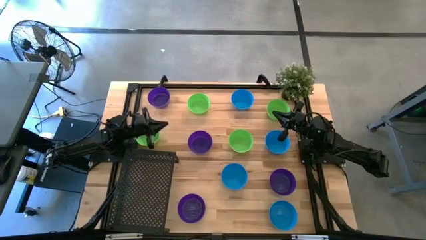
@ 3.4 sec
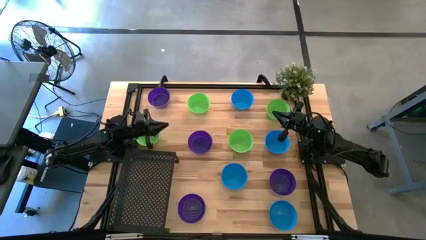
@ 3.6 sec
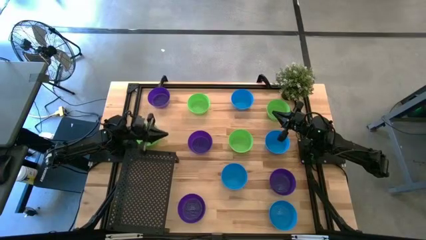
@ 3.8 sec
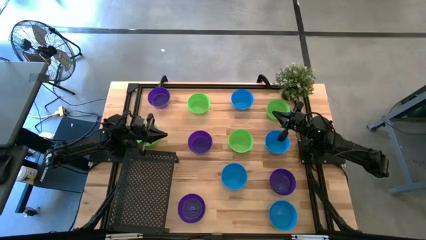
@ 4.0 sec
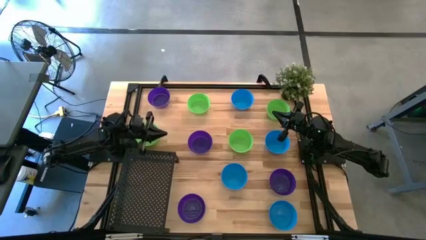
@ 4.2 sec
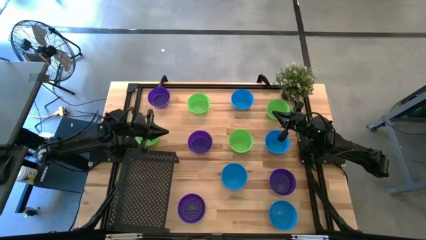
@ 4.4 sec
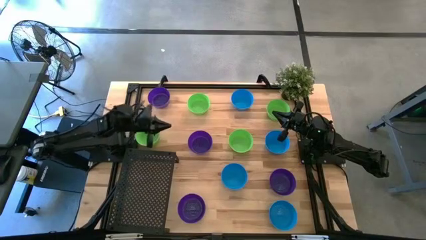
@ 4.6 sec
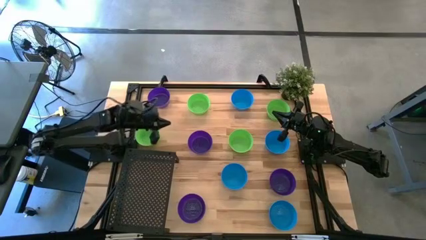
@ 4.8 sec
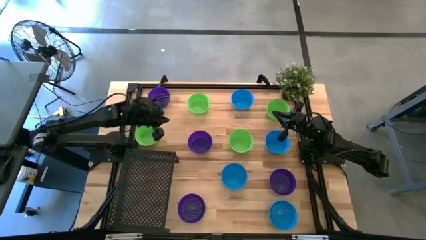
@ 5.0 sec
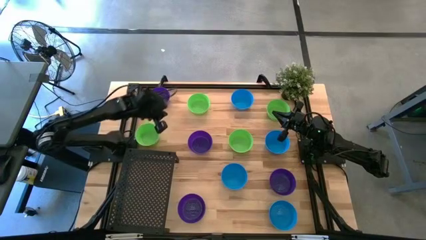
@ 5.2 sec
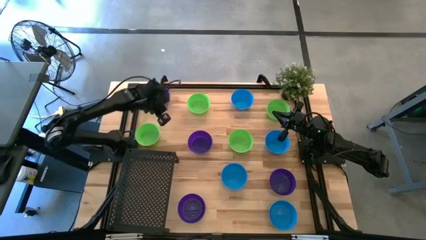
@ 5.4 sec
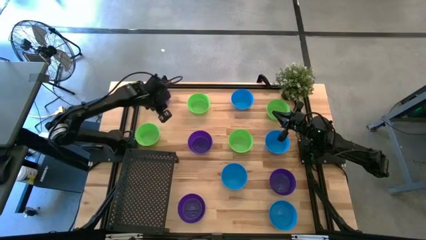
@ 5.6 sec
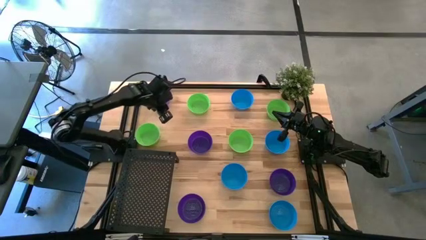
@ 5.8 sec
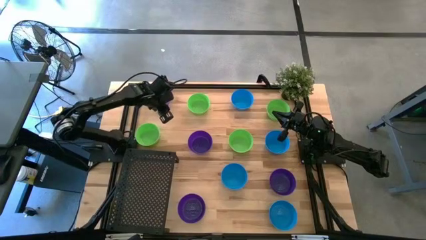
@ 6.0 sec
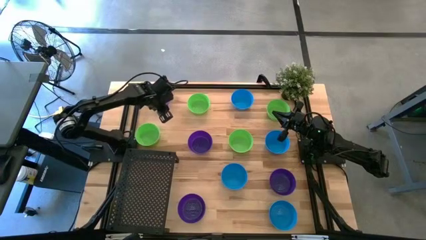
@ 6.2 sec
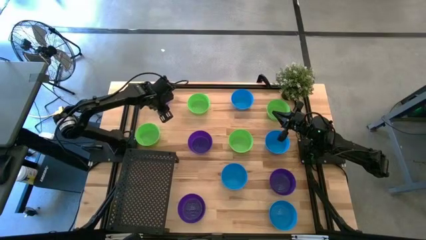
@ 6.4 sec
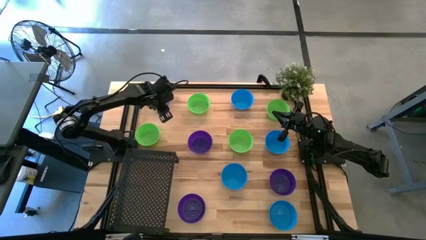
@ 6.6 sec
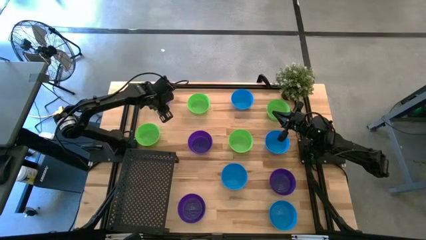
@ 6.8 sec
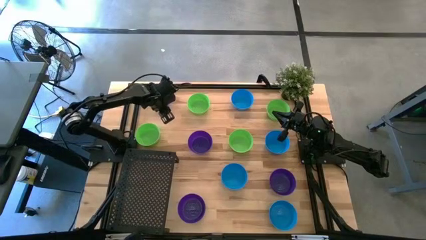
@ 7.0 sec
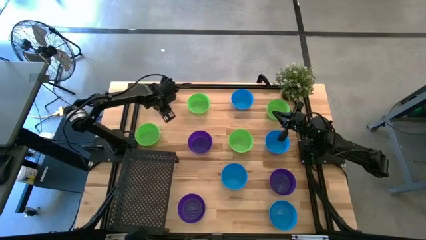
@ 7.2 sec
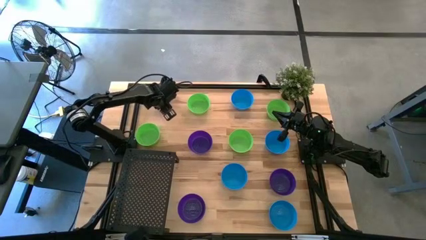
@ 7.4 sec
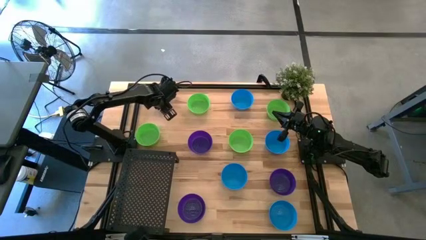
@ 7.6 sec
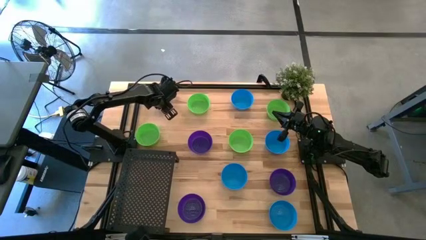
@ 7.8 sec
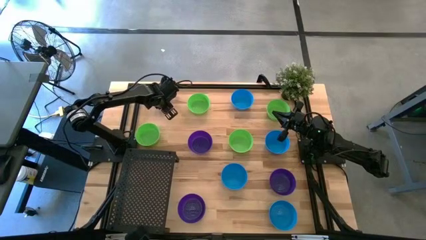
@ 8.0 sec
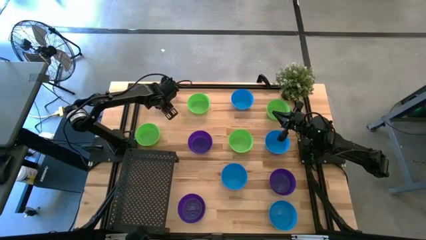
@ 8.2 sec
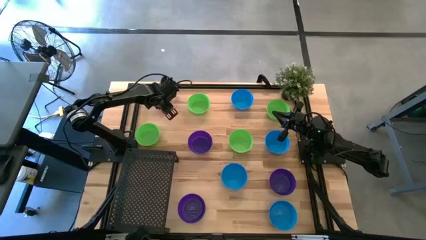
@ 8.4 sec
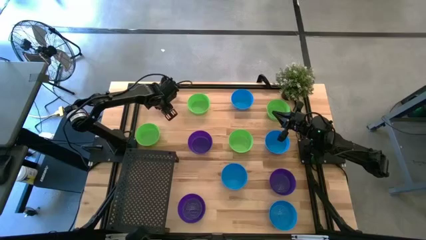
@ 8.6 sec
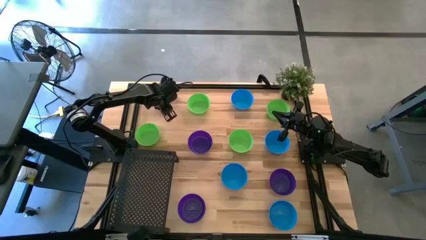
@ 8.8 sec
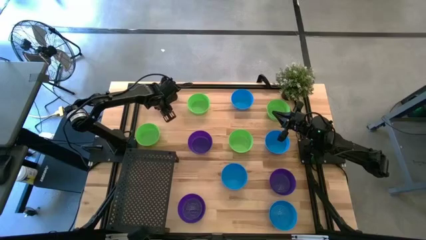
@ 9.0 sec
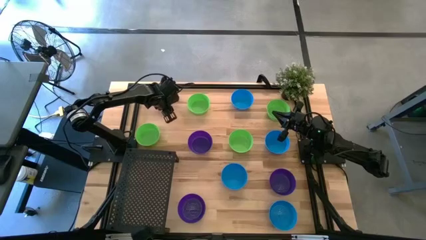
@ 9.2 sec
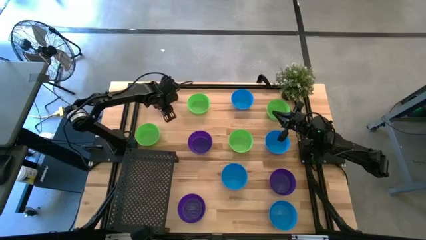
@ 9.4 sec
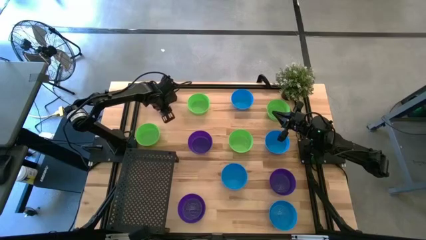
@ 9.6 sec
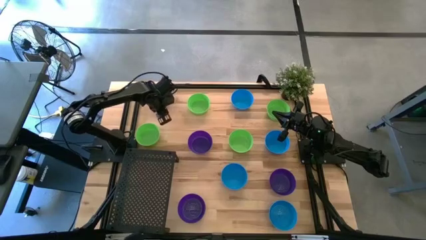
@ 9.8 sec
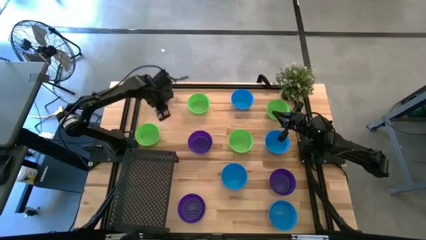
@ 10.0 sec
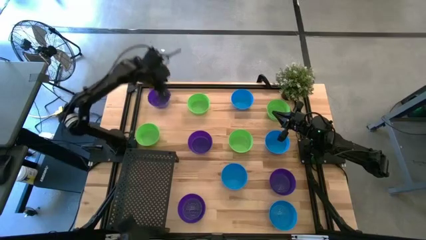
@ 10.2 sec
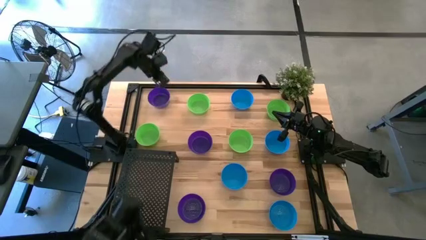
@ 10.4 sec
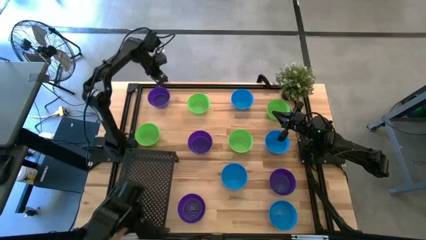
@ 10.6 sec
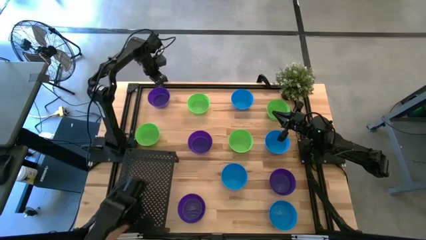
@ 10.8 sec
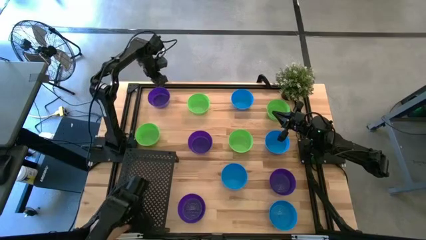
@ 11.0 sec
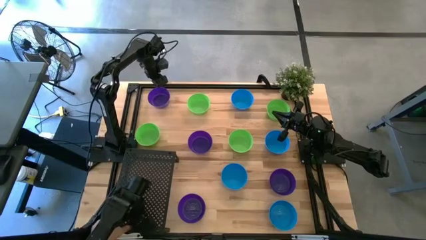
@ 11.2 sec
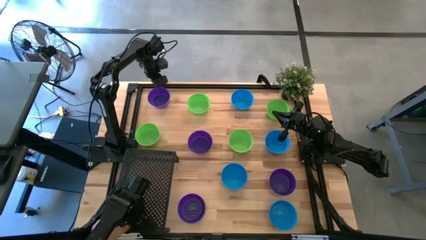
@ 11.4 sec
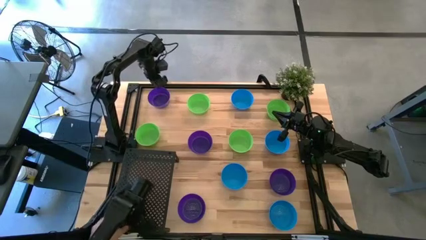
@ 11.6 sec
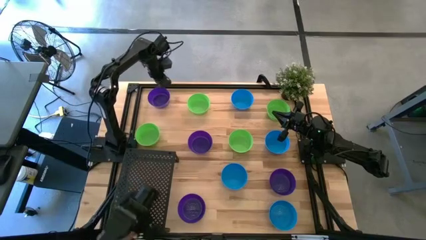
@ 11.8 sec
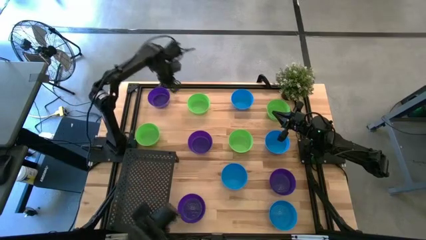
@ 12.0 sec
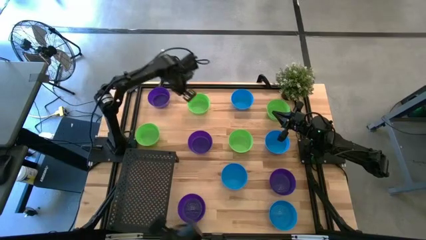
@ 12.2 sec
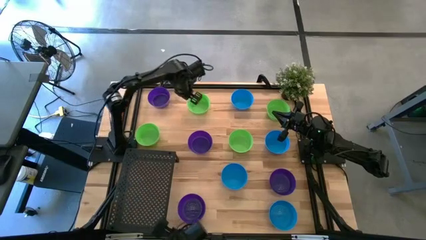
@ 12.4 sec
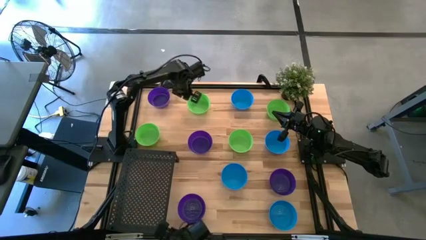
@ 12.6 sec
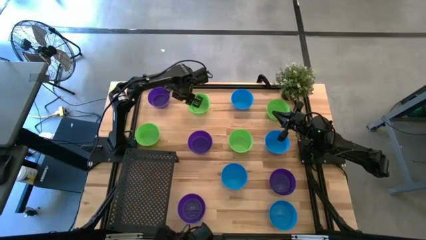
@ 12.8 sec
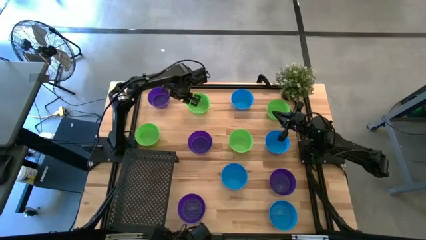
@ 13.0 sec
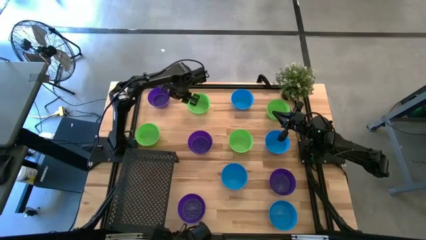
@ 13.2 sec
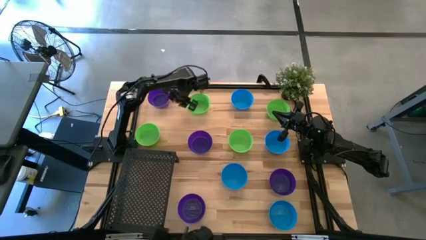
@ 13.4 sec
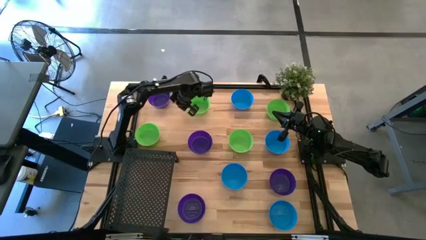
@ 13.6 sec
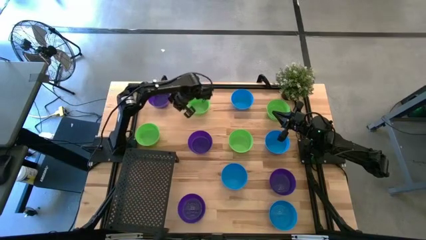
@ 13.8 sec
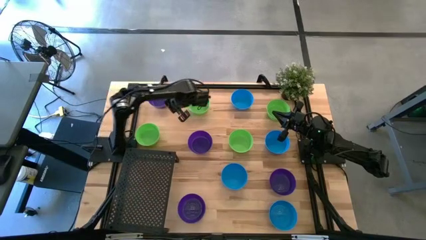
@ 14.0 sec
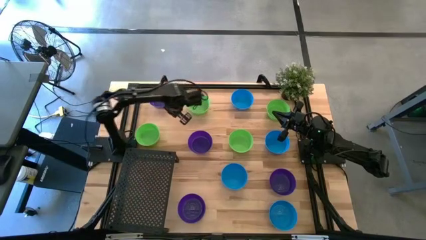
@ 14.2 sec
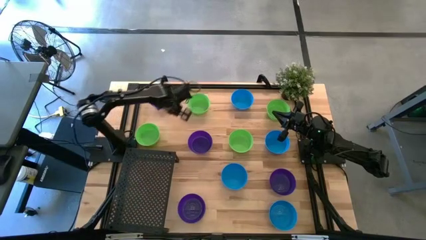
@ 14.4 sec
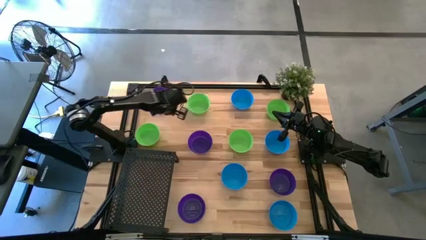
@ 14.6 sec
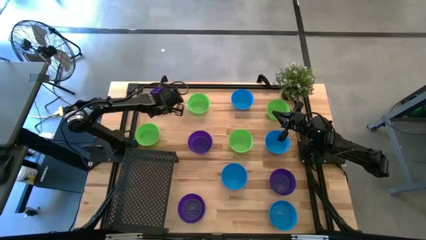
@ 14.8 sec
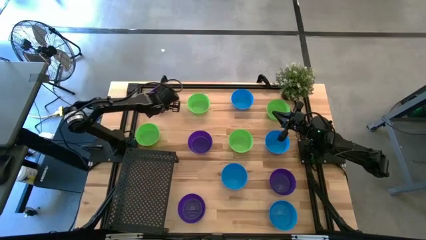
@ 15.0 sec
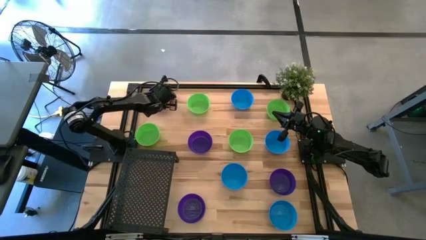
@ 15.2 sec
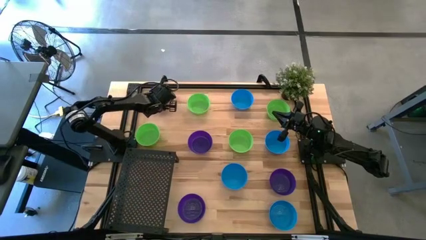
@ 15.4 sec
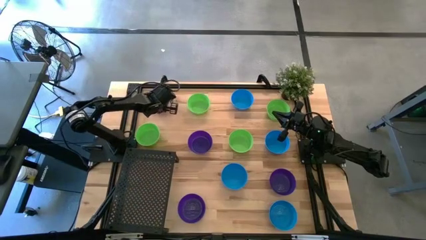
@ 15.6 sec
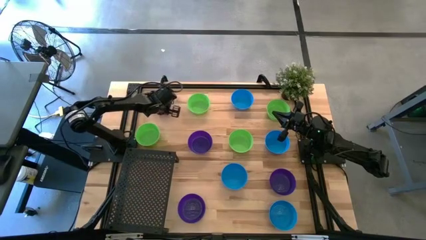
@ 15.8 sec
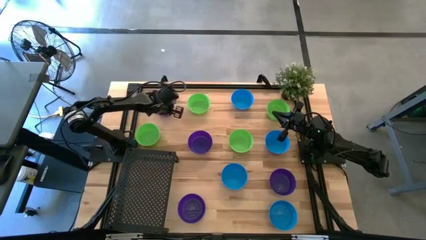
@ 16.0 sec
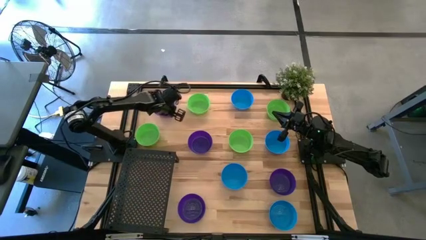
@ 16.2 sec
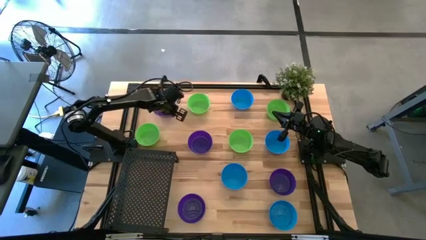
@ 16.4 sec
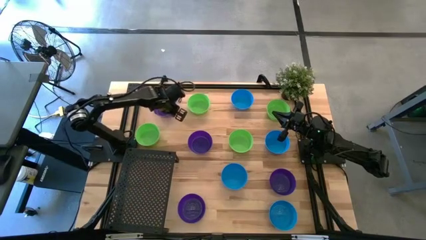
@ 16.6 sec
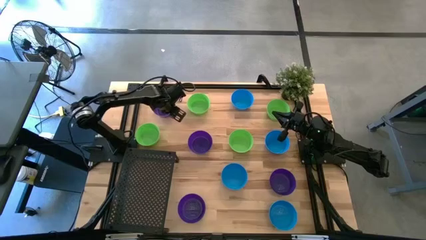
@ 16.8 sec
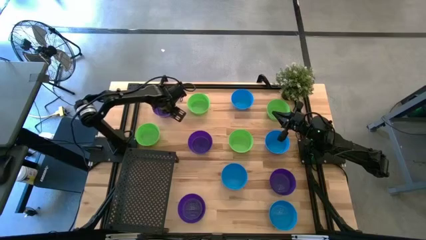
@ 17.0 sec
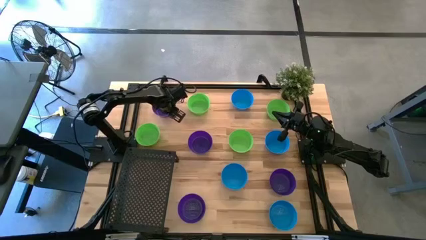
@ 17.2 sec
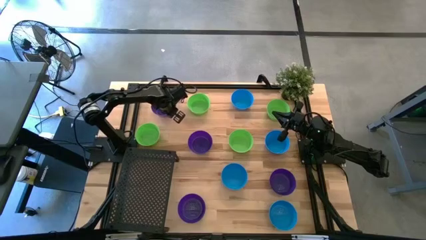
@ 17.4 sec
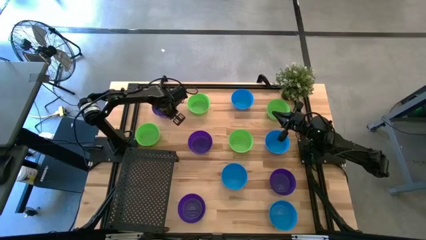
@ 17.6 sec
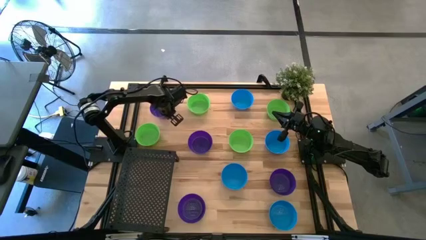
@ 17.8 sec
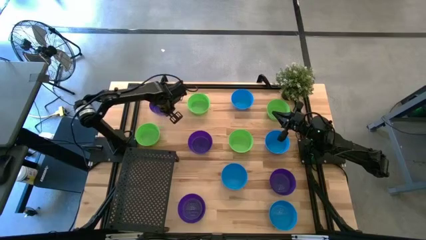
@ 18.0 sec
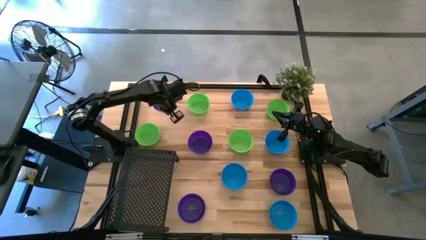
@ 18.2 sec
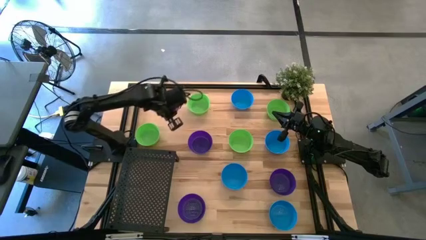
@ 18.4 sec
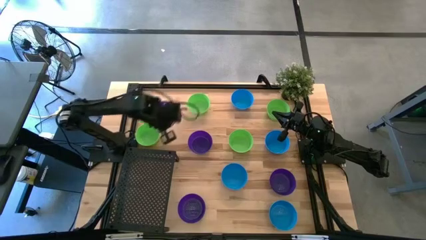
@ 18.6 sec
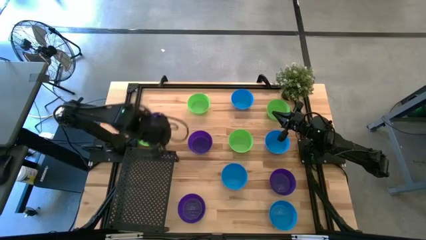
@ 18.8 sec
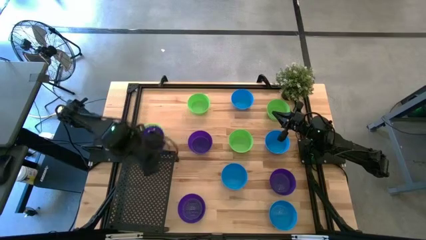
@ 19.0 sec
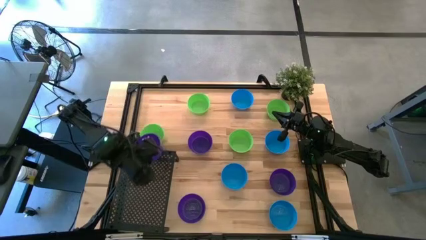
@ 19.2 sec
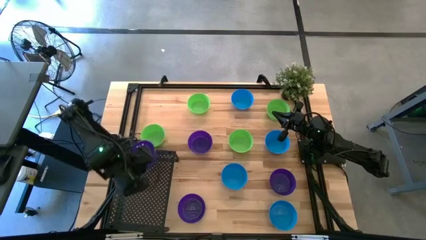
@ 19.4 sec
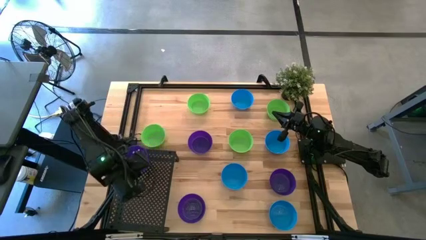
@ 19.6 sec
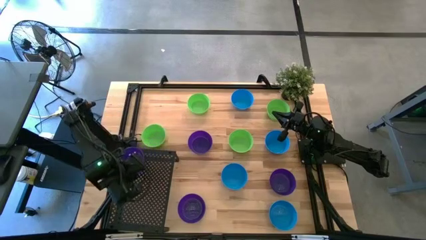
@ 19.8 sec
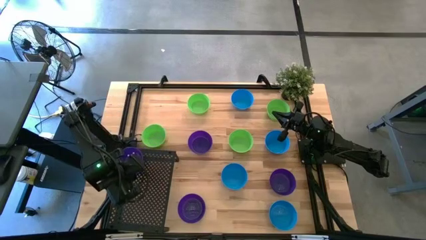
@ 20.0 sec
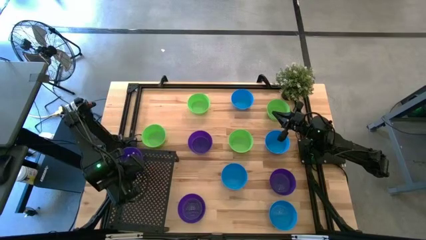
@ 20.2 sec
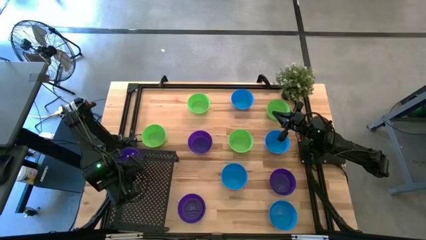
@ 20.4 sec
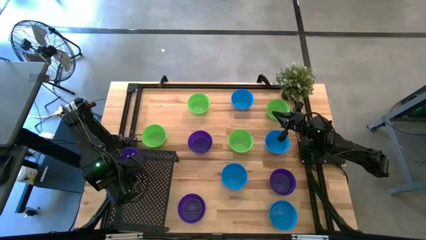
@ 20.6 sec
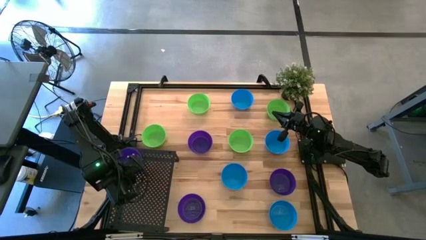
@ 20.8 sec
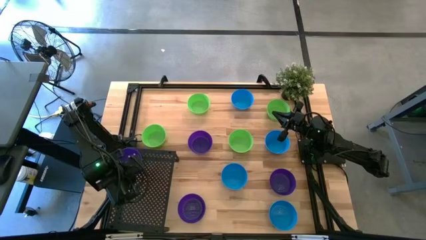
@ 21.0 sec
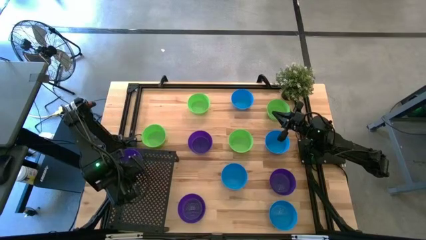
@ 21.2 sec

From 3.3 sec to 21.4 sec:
Task: Pick & Place Mini bowls
Put the violet bowl on the shelf
